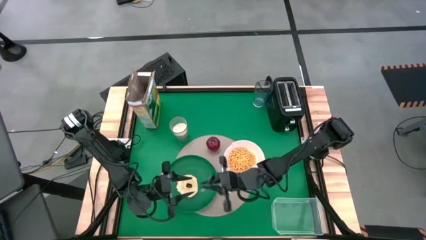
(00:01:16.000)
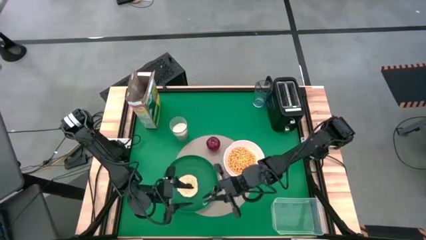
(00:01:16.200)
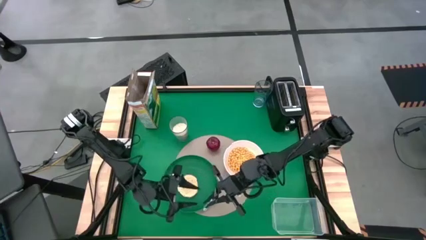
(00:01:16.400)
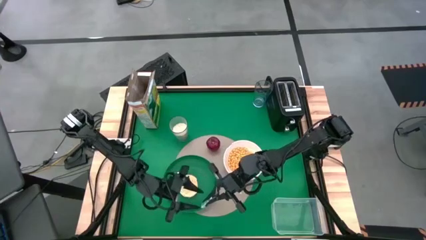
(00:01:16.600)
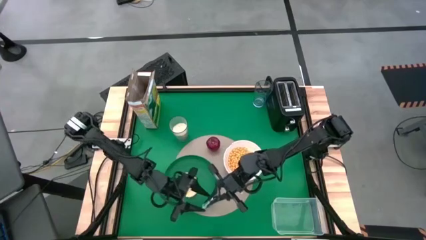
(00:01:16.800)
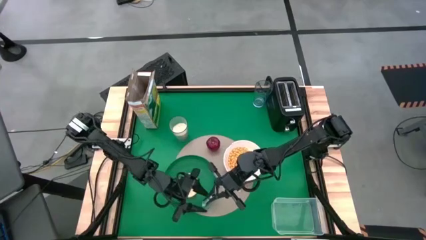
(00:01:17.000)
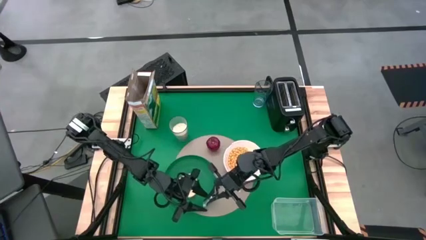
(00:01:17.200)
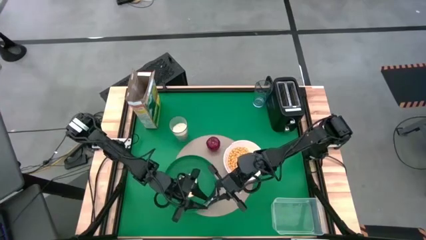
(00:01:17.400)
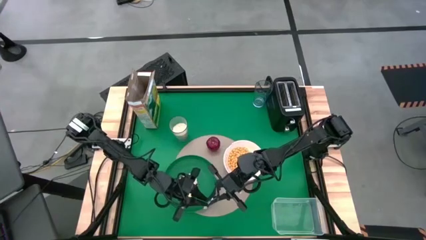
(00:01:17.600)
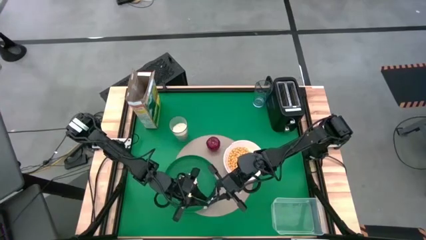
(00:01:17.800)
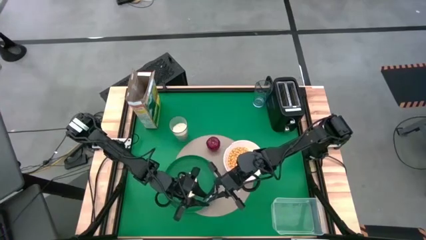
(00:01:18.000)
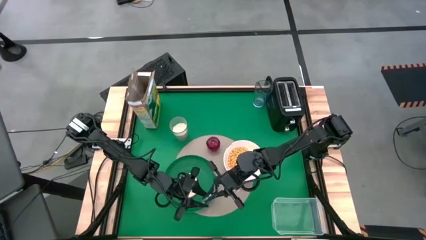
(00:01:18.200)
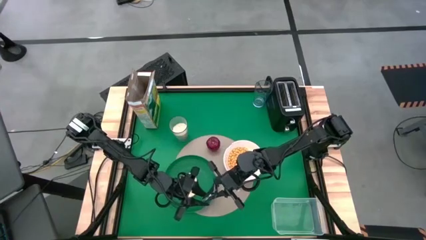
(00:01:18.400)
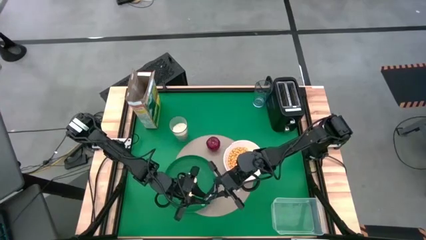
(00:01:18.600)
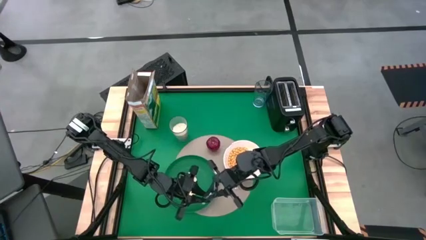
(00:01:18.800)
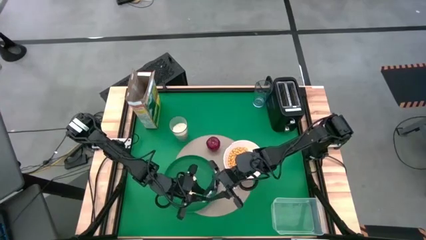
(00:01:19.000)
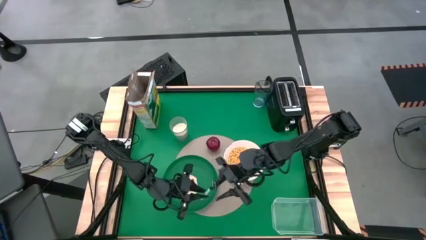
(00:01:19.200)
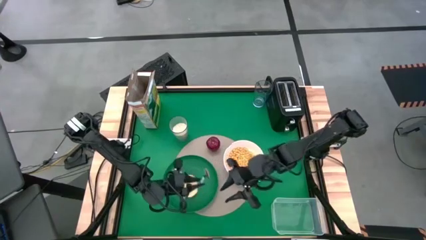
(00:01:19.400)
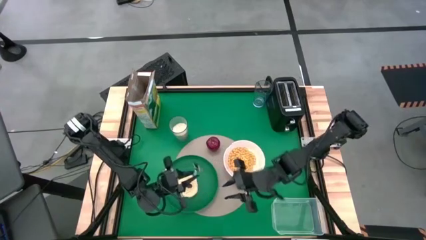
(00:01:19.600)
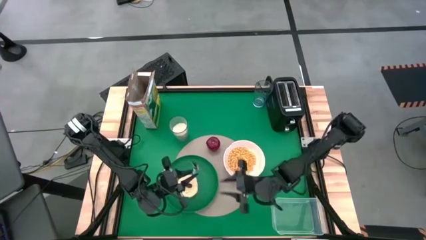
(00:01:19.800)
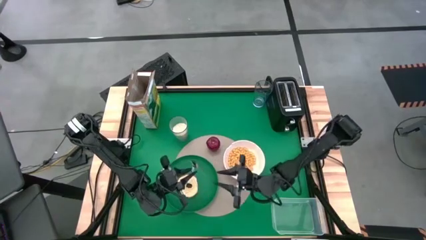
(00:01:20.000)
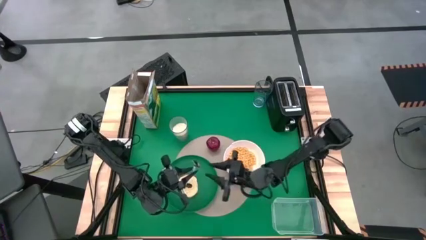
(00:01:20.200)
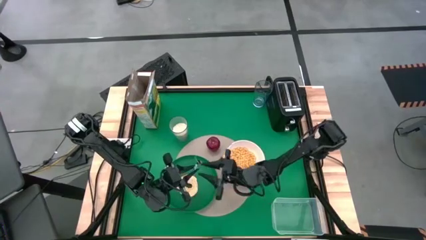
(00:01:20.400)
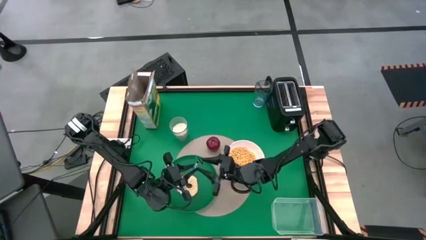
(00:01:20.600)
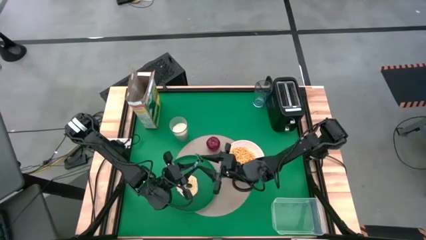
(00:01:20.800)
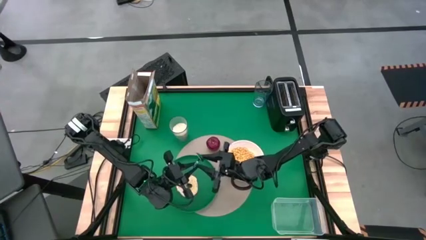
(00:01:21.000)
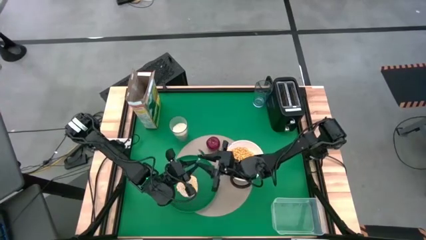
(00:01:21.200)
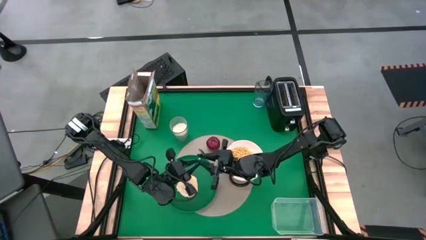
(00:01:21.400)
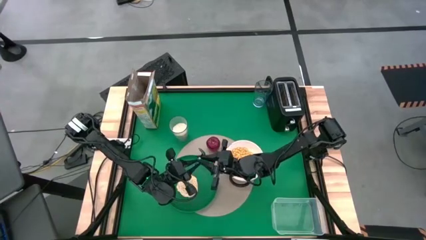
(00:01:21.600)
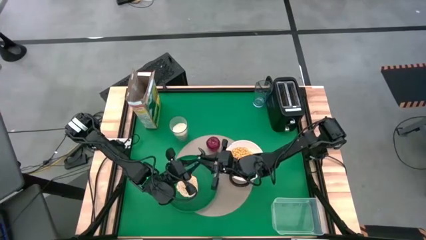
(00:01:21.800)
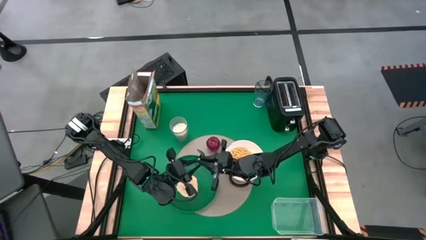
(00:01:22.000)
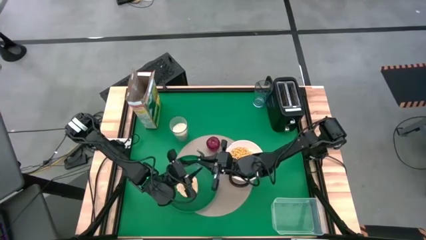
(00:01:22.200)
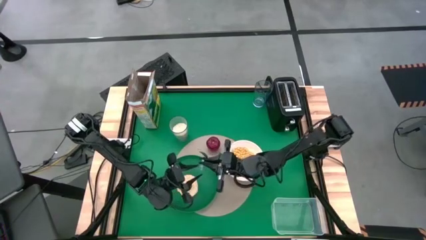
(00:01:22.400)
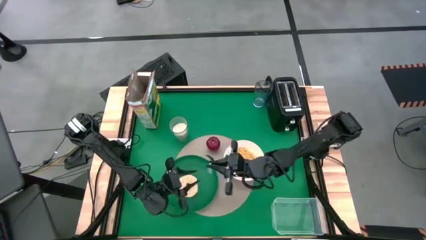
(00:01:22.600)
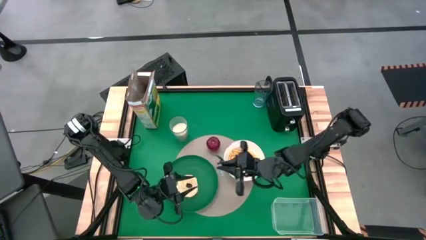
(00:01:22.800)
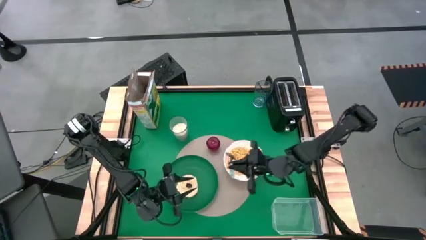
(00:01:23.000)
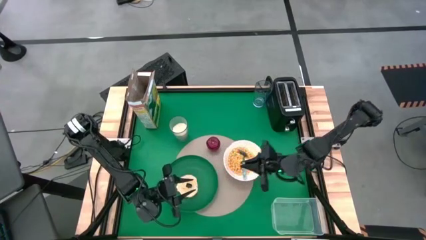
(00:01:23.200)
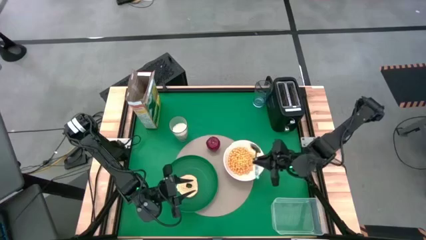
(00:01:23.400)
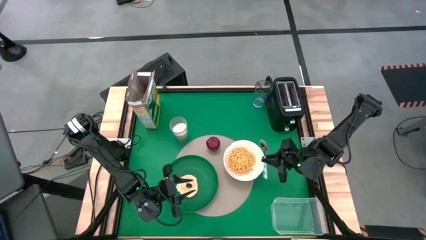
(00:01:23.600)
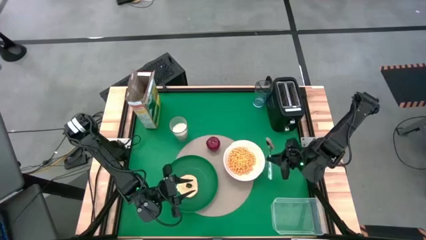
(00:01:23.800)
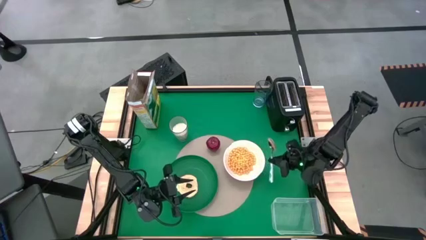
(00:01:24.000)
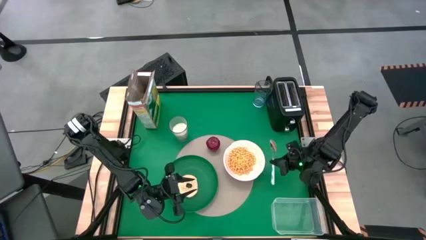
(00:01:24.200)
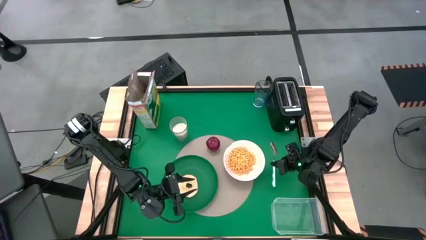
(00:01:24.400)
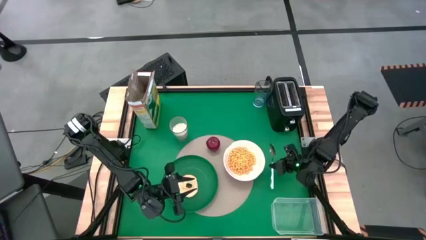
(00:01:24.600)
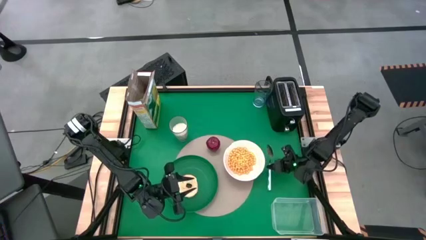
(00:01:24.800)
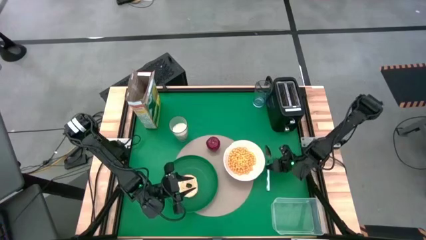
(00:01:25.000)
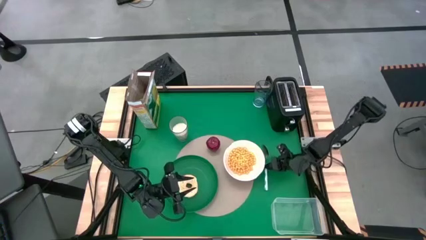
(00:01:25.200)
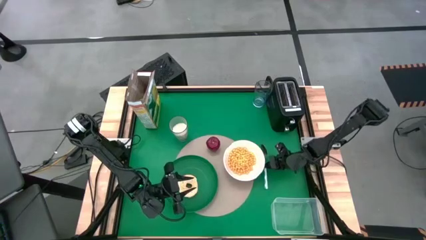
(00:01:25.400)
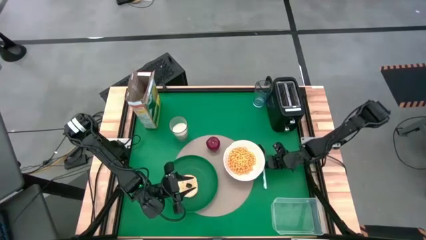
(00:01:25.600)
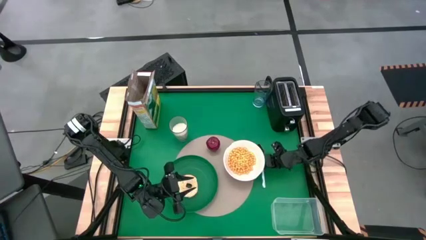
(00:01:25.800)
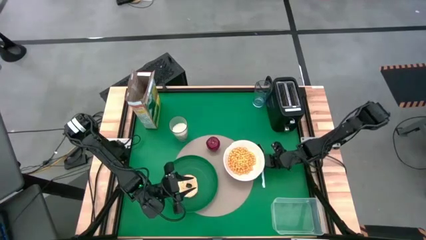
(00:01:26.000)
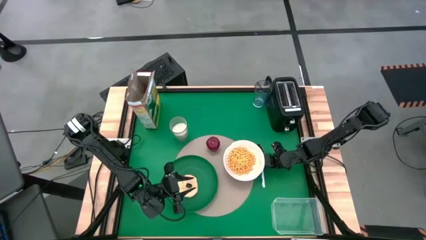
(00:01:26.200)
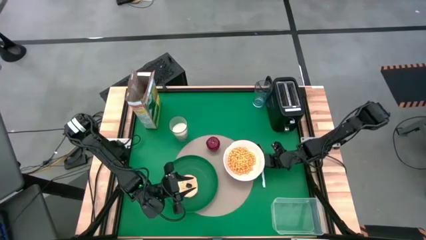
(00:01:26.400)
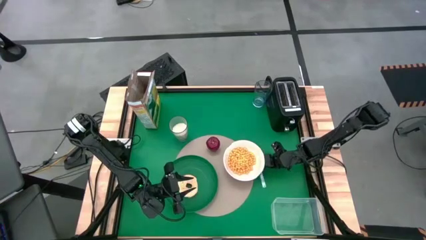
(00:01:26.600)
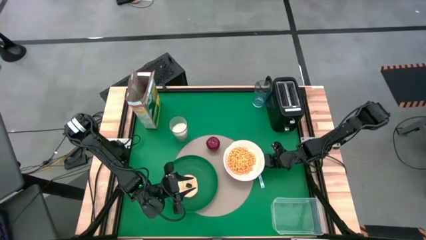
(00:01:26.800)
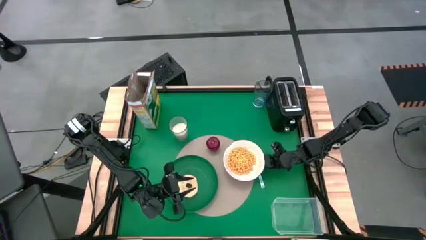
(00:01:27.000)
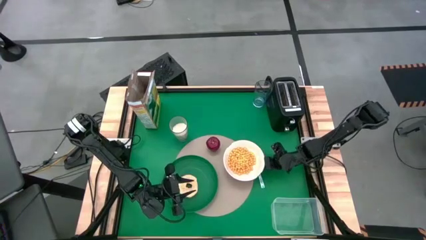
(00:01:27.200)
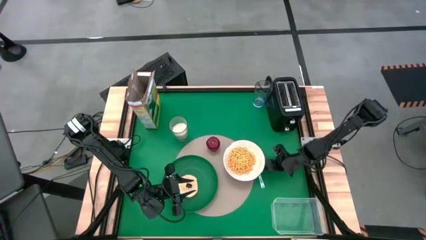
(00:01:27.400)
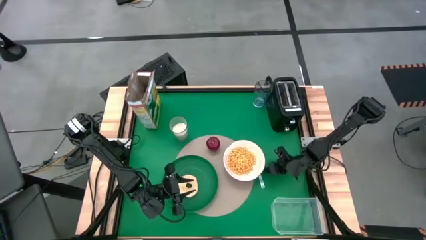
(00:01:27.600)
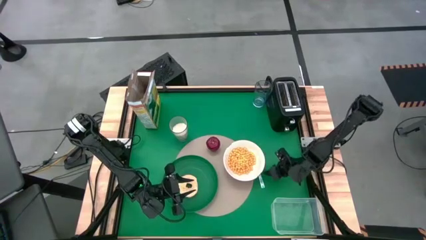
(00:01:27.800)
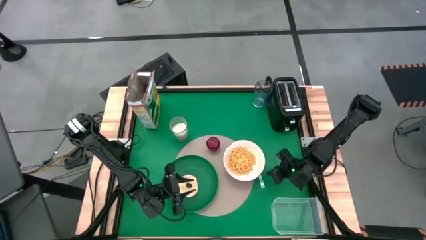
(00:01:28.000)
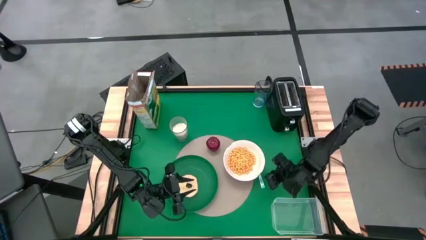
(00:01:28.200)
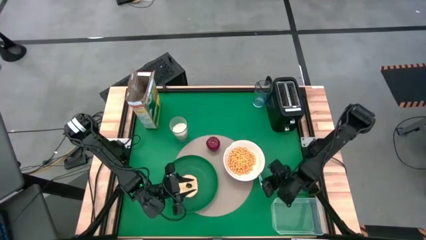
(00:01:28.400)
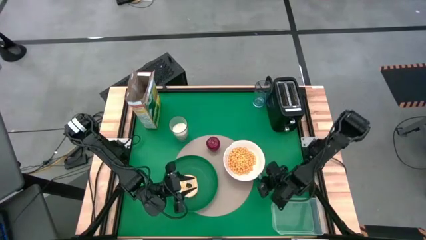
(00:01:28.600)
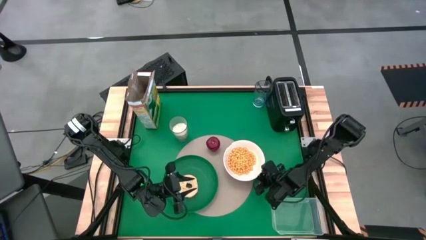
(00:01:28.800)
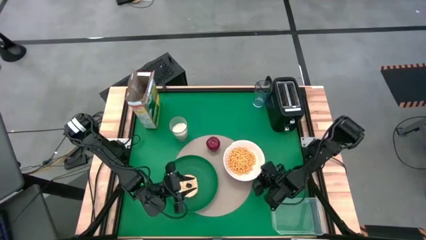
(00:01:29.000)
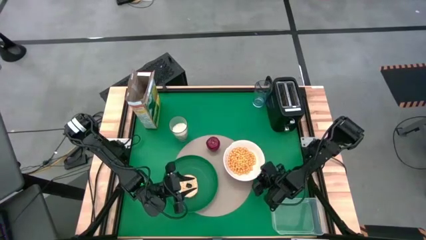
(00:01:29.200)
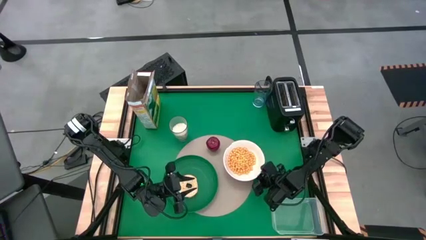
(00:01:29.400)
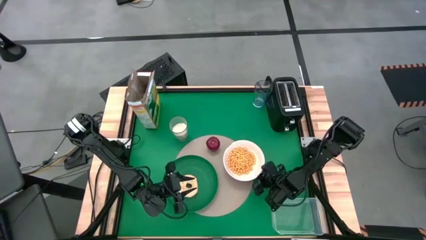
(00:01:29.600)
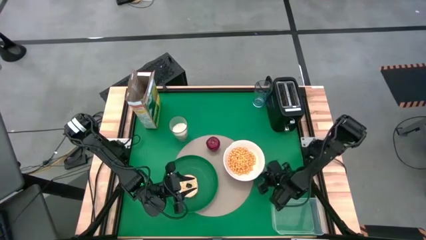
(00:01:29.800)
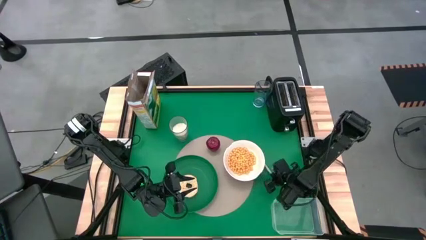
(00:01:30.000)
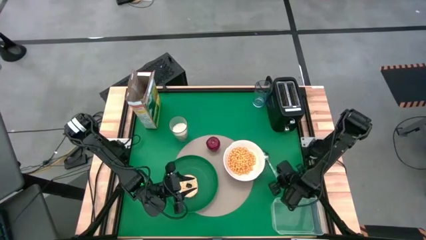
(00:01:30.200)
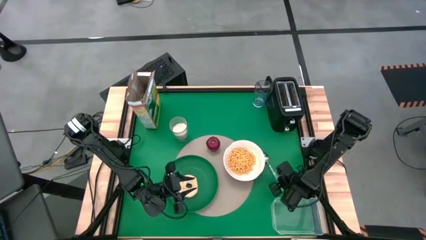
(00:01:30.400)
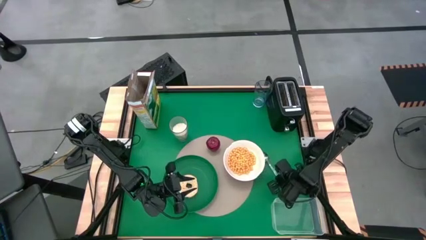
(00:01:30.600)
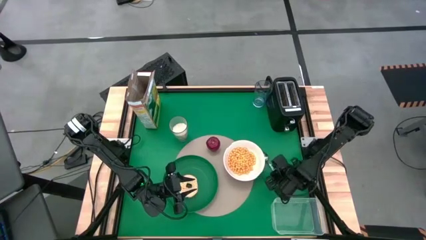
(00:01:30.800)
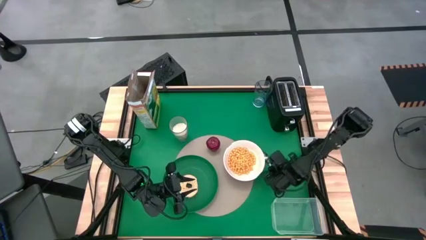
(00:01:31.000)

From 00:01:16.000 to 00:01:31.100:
Task: Arrange a breakfast setting
Put the white green spoon to the right of the white bowl on the table
